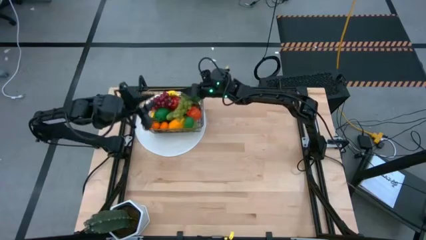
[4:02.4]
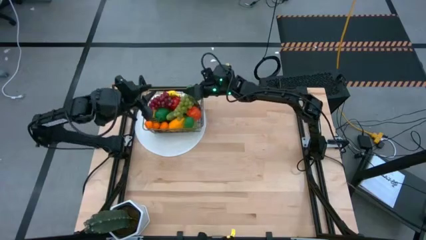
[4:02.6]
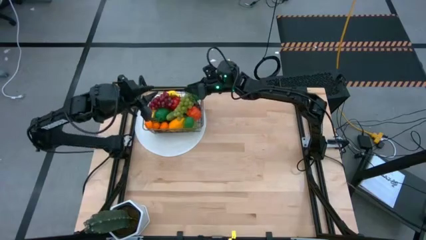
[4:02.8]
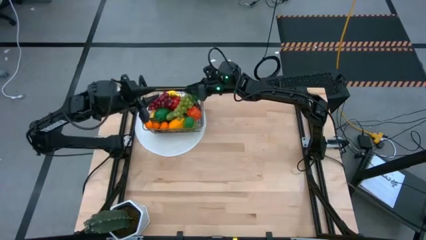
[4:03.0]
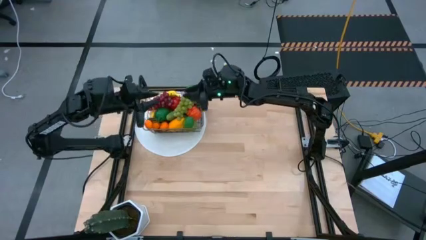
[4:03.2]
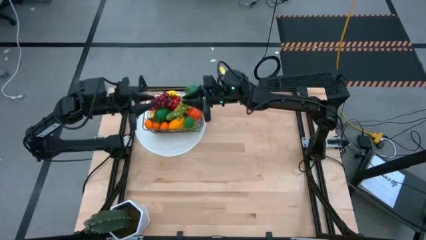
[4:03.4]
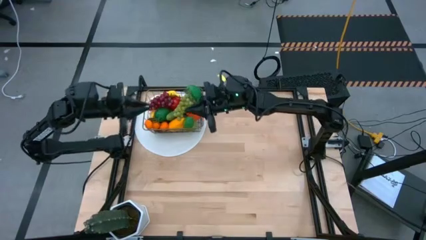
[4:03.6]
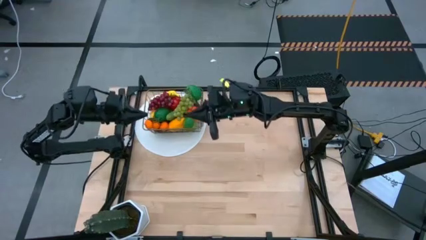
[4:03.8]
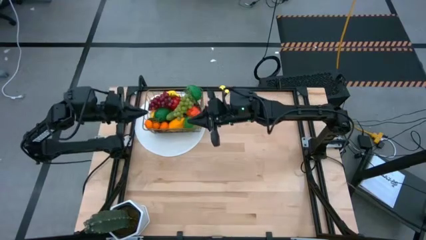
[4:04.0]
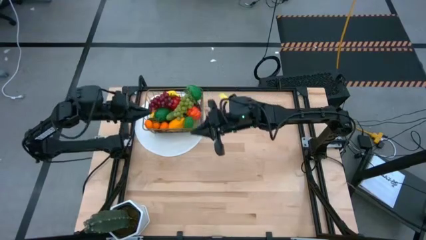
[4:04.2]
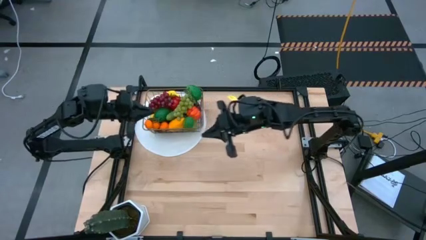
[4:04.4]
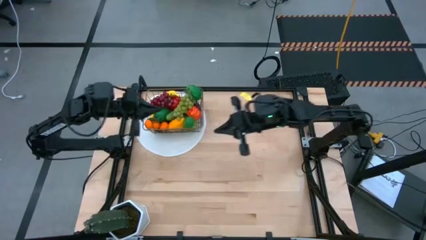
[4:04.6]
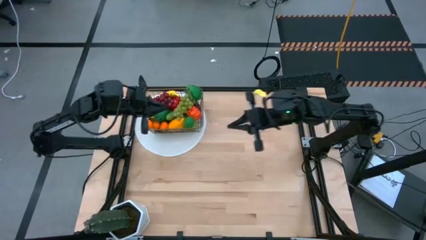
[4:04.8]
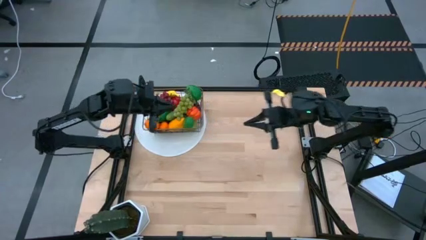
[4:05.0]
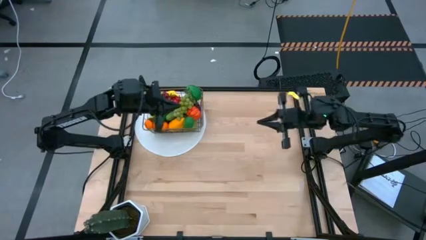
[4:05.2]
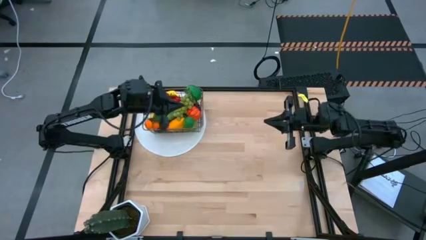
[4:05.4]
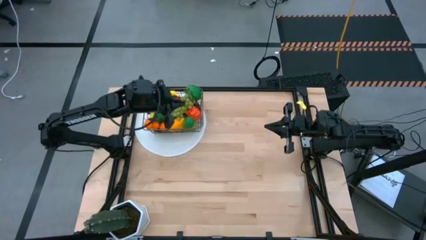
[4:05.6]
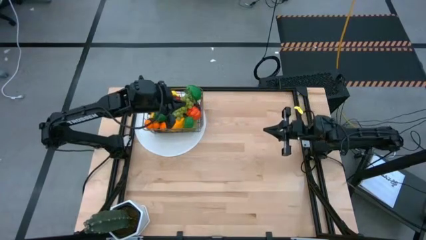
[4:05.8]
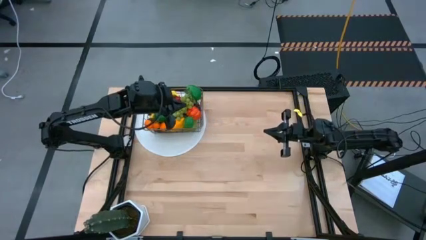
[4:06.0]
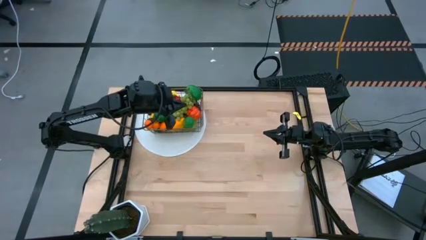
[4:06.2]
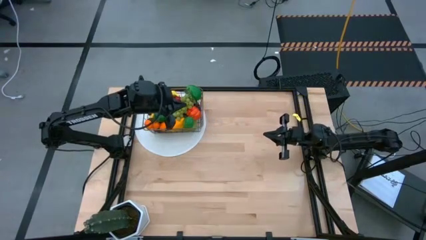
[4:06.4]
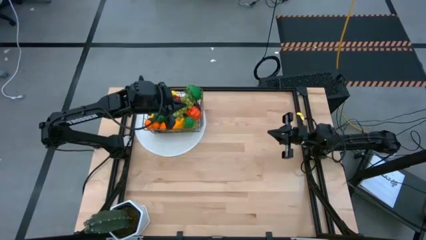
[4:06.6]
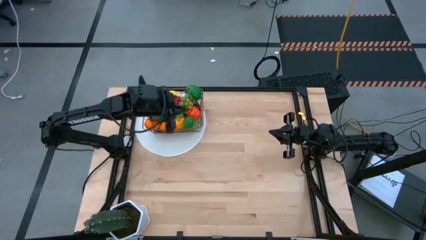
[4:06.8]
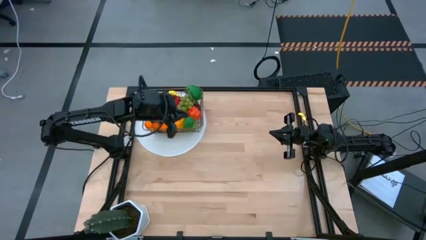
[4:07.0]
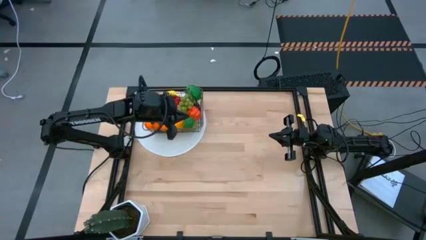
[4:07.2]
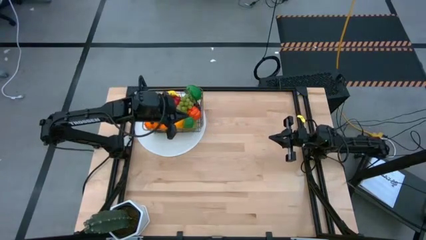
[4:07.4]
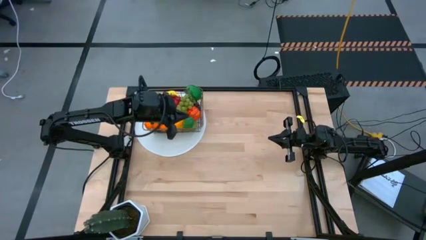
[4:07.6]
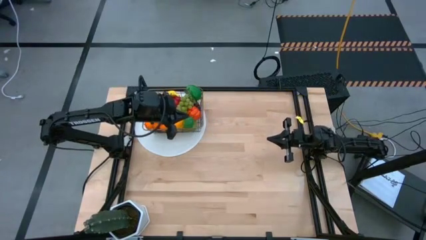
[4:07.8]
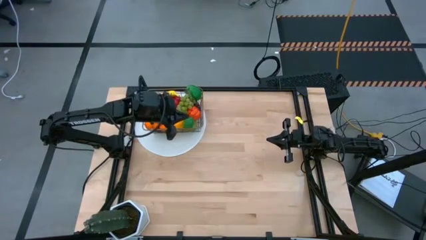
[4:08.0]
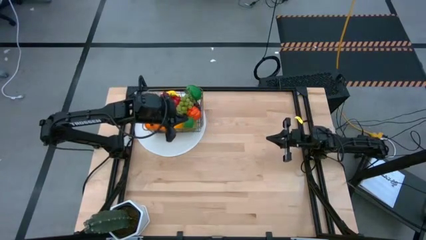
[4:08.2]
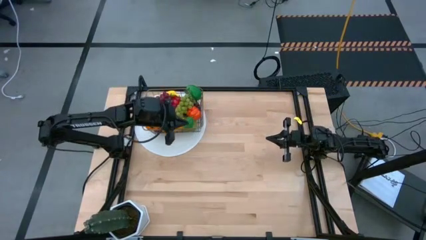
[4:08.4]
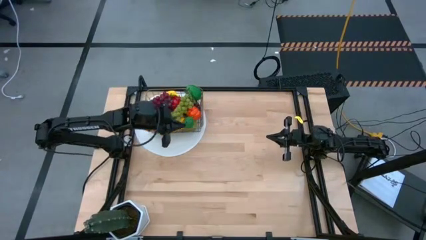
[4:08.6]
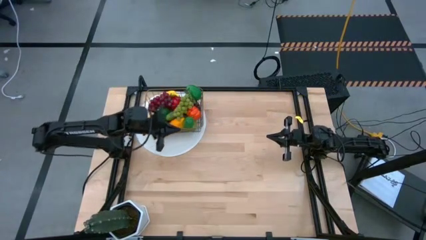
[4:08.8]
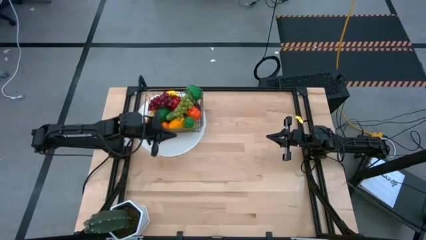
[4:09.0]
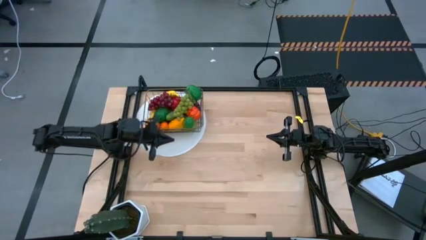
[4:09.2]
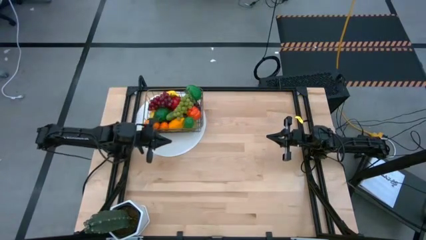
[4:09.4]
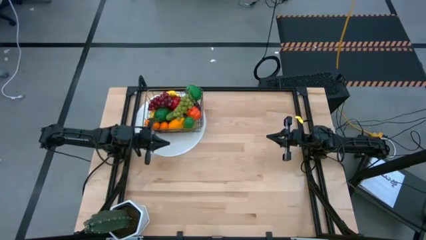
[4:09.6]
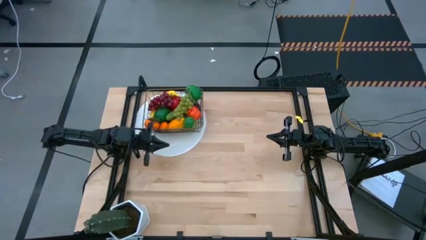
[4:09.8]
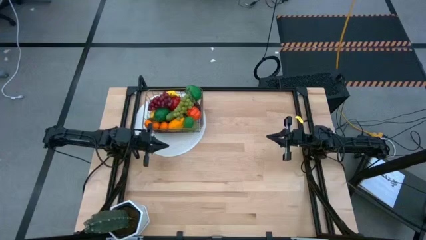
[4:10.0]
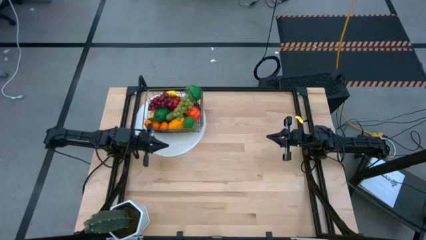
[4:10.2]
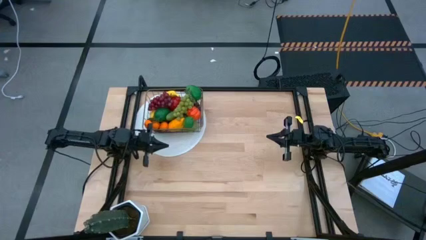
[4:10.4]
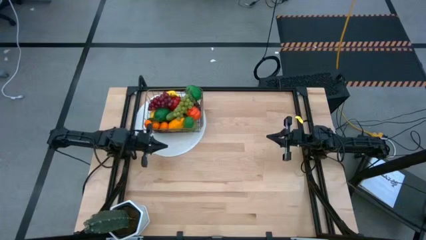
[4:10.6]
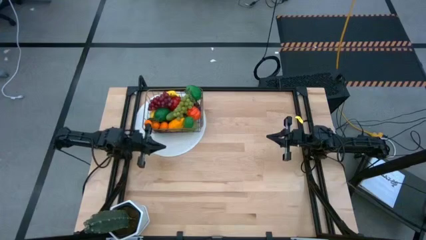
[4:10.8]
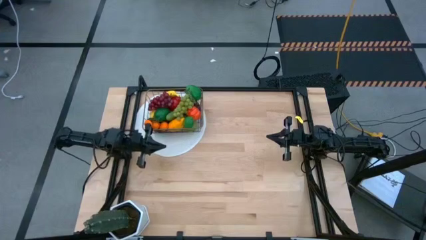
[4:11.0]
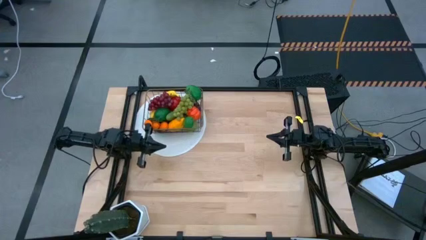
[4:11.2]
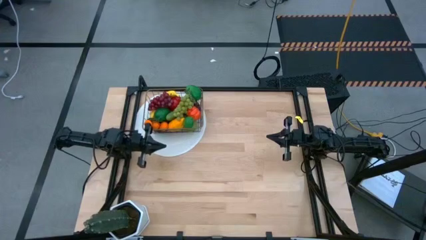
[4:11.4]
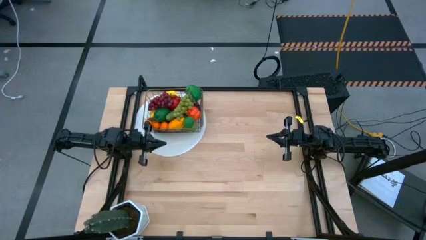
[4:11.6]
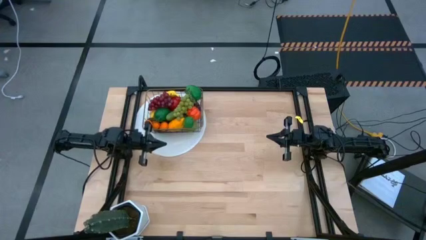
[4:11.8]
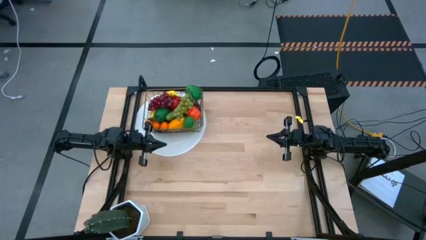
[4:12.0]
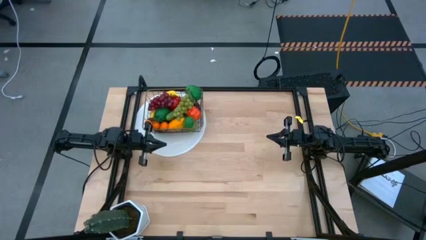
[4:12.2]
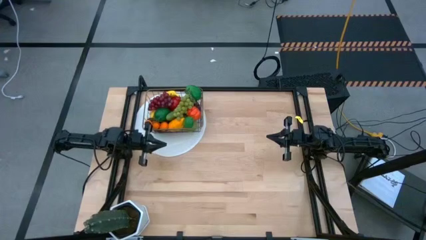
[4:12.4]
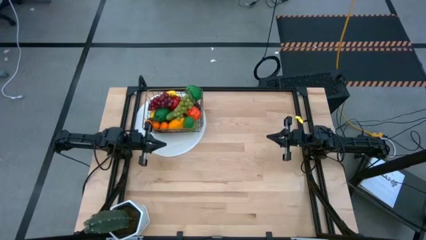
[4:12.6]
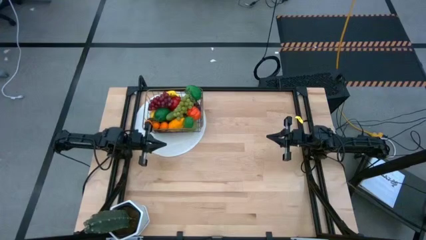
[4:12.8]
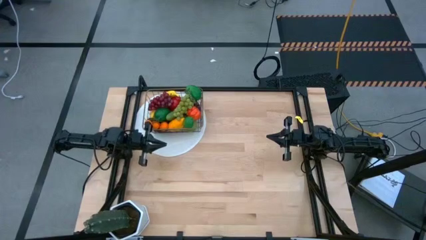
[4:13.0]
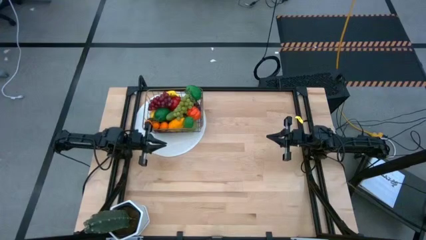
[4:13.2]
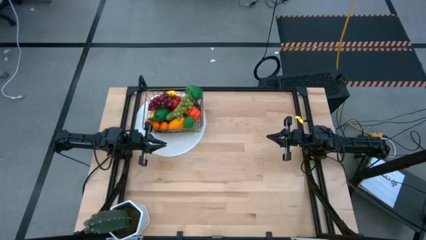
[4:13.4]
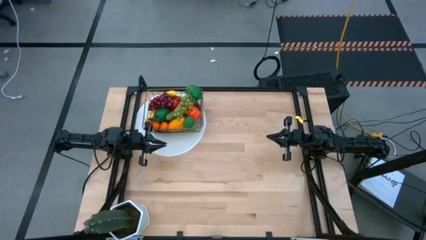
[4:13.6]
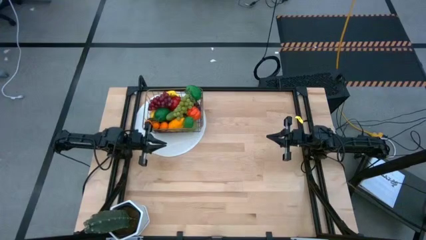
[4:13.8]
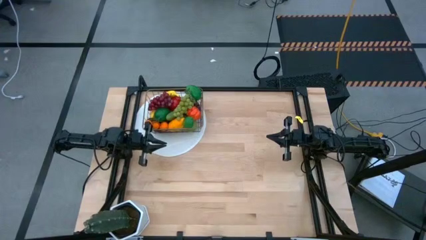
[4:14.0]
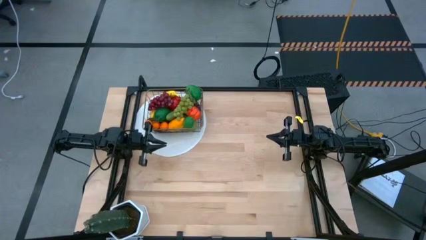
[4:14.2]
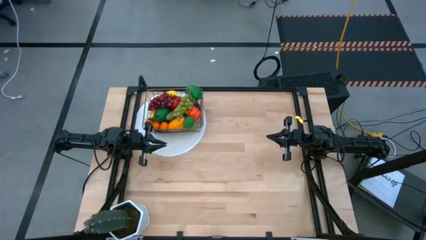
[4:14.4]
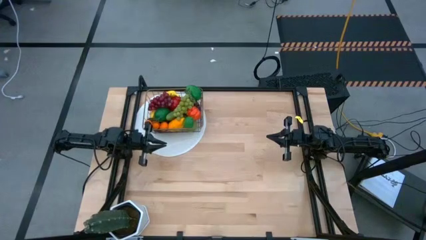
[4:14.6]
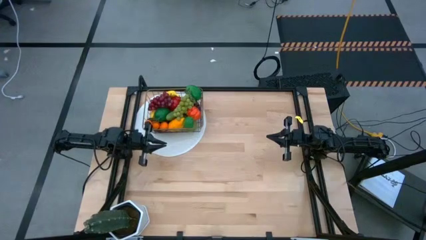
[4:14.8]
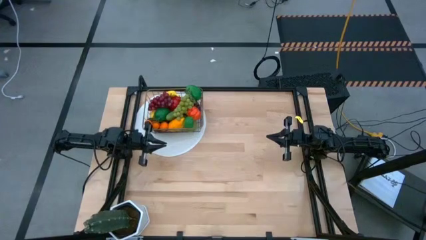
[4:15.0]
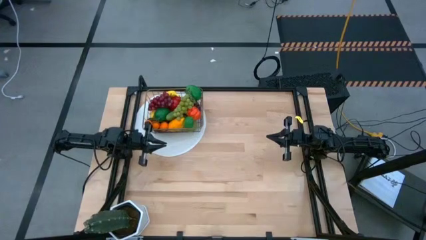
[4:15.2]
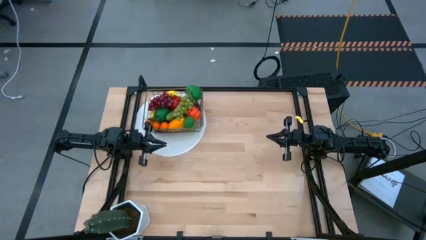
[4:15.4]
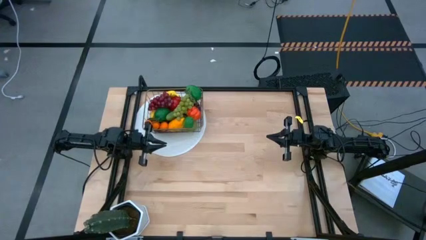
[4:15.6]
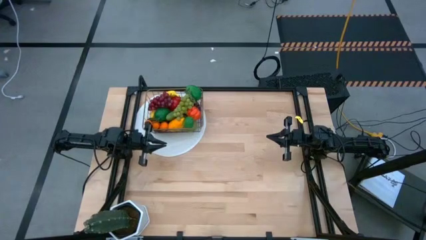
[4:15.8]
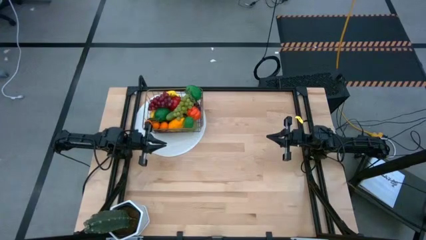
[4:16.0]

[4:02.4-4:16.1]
Task: Build produce basket
Return to Home Position

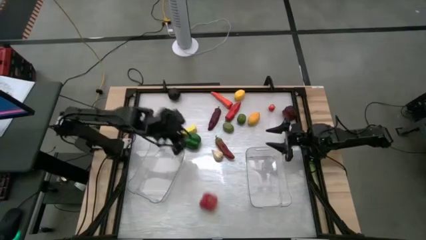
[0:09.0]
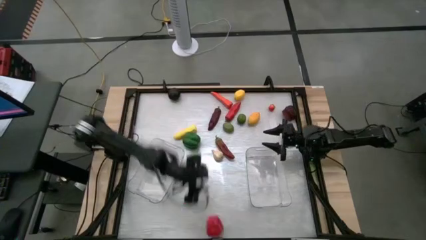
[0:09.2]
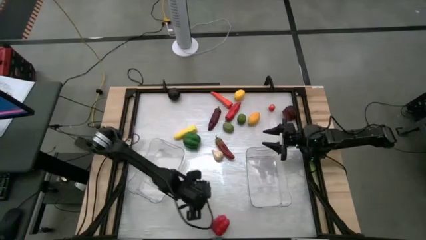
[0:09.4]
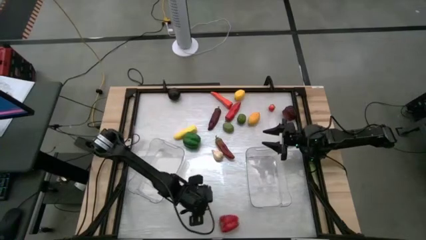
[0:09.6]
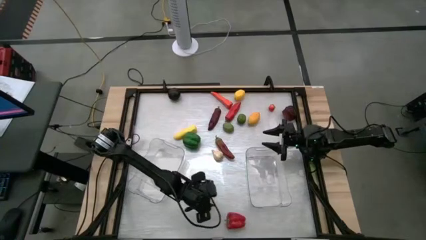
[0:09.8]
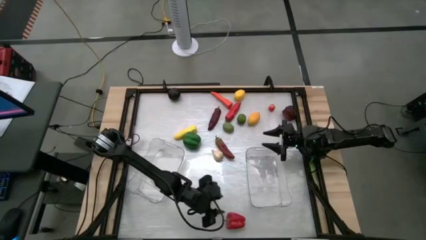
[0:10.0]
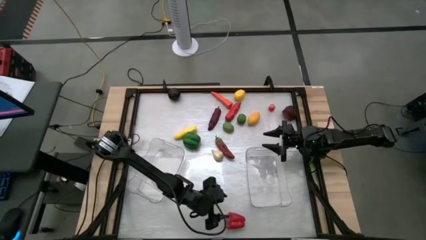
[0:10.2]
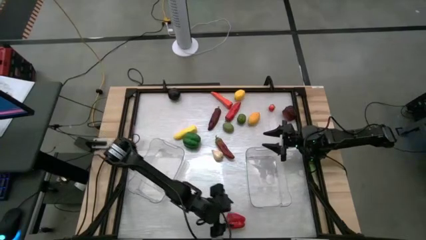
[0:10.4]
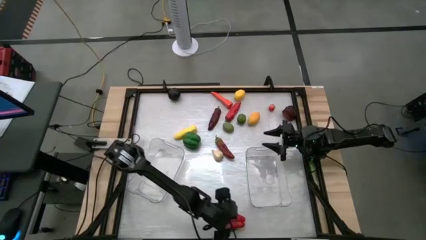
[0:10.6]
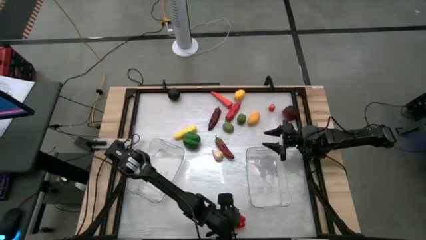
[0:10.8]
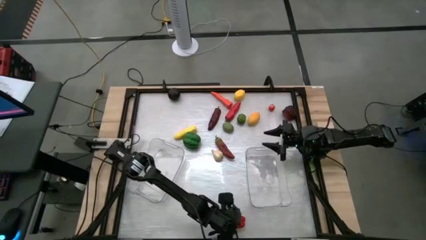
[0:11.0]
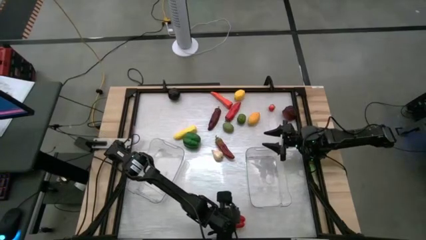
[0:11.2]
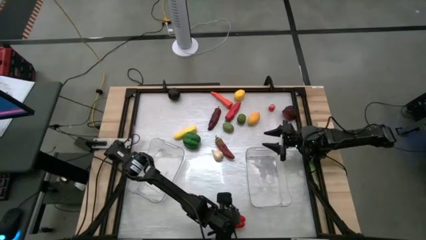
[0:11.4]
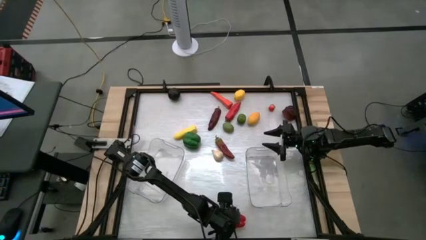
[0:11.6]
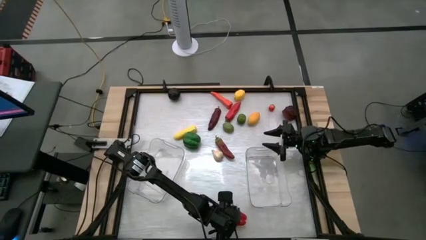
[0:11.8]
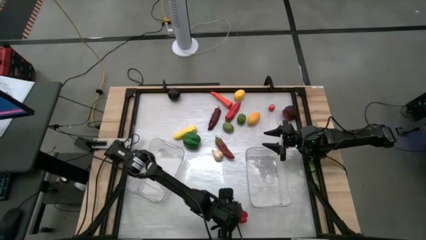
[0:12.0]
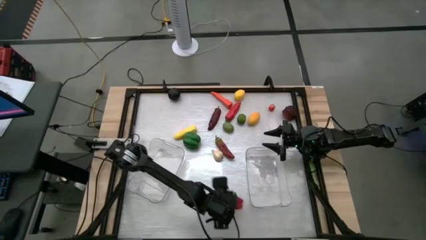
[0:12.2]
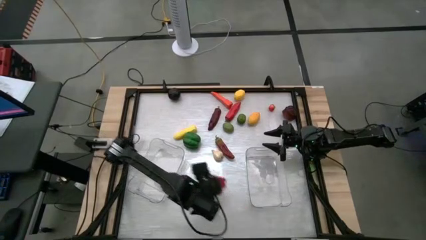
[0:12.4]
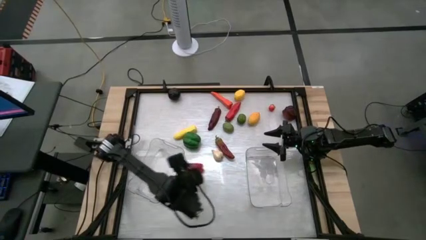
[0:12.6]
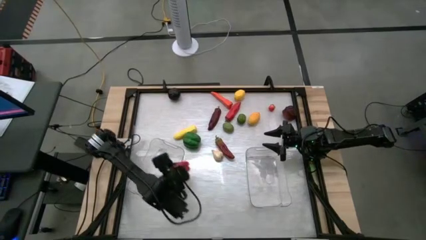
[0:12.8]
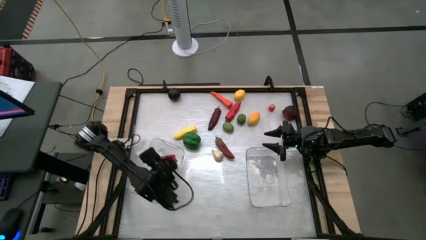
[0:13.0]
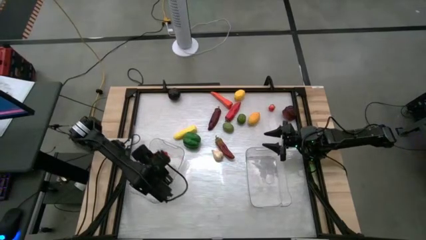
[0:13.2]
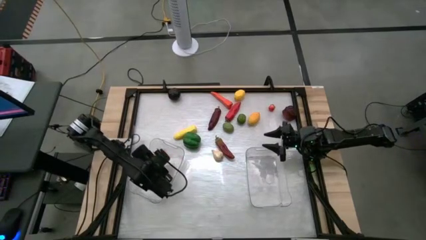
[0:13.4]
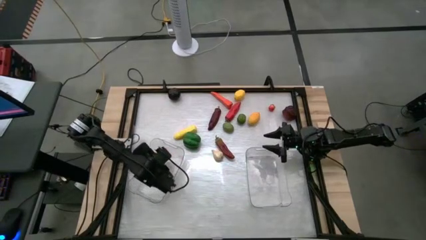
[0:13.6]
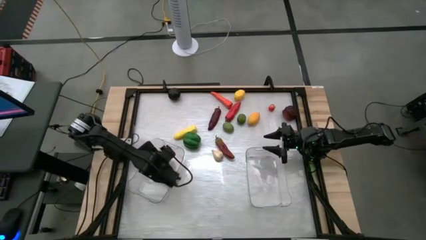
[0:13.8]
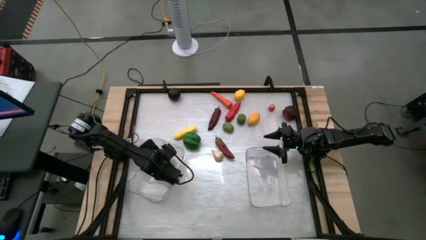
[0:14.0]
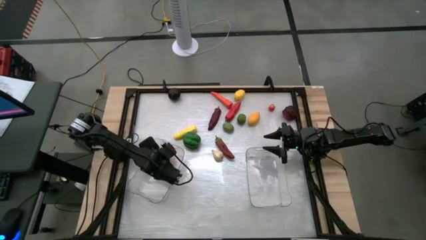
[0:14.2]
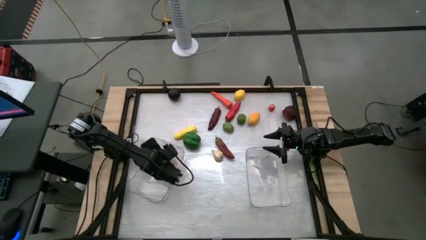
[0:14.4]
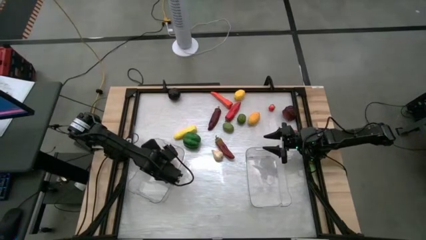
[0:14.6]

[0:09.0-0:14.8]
Task: Sort produce into baskets
Put the red bell pepper into the left transparent bin
